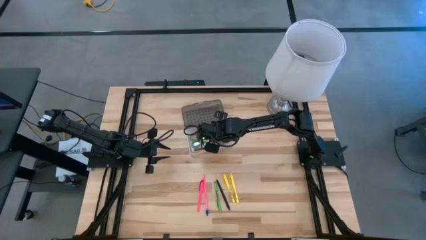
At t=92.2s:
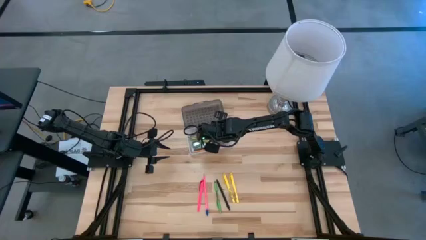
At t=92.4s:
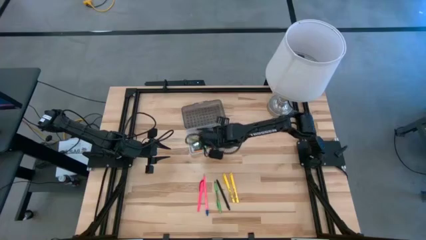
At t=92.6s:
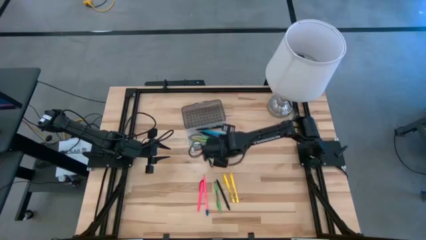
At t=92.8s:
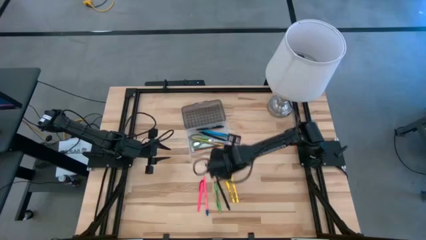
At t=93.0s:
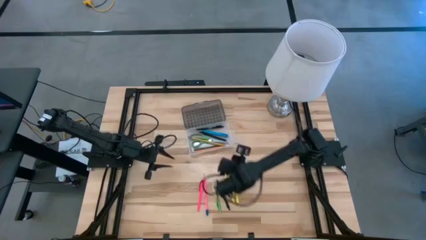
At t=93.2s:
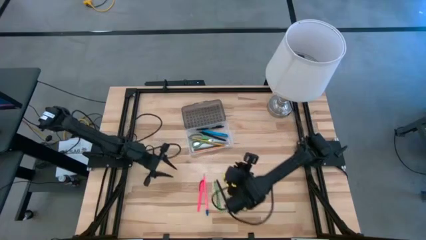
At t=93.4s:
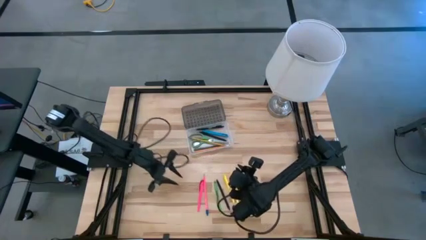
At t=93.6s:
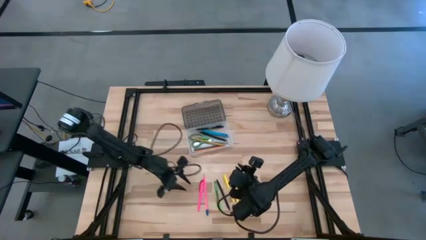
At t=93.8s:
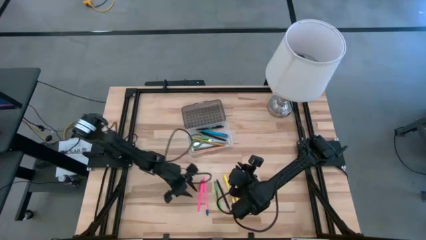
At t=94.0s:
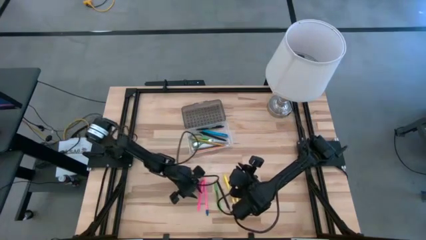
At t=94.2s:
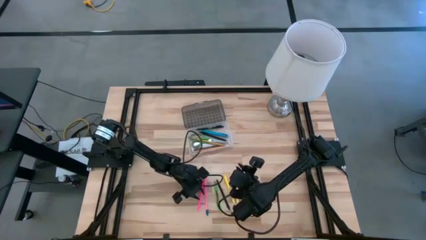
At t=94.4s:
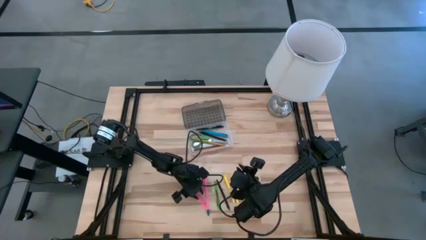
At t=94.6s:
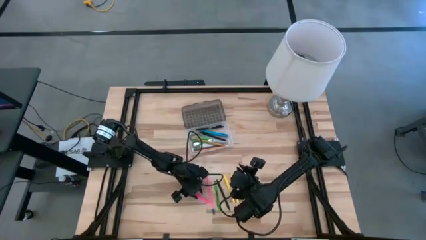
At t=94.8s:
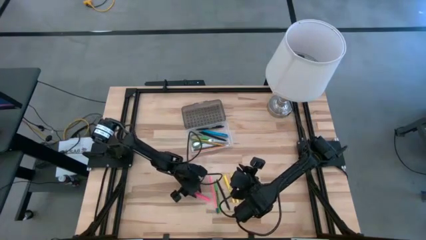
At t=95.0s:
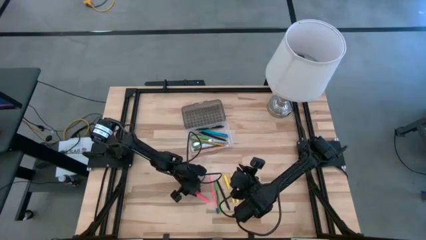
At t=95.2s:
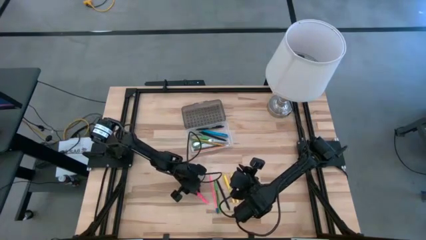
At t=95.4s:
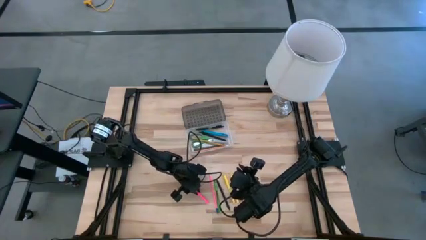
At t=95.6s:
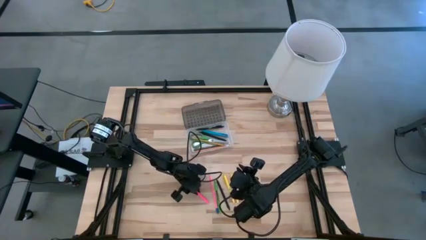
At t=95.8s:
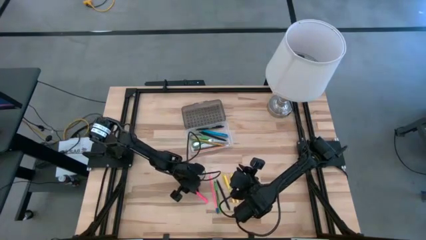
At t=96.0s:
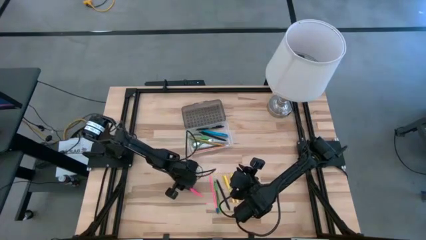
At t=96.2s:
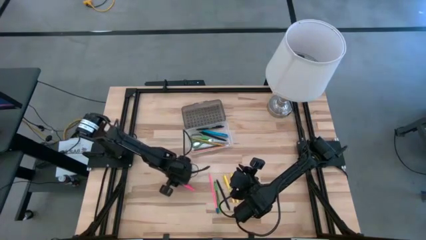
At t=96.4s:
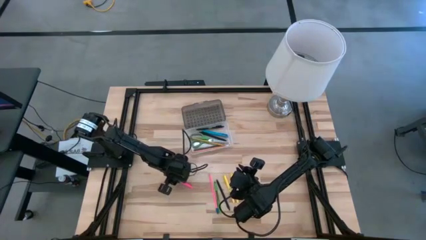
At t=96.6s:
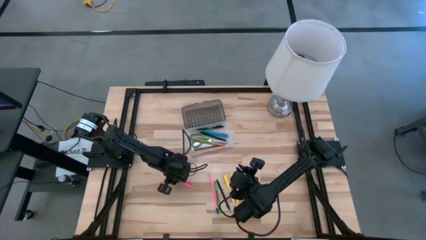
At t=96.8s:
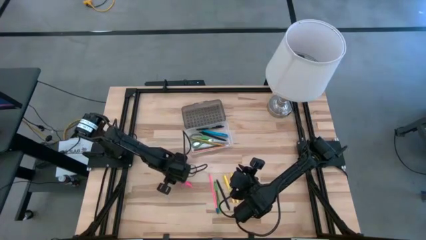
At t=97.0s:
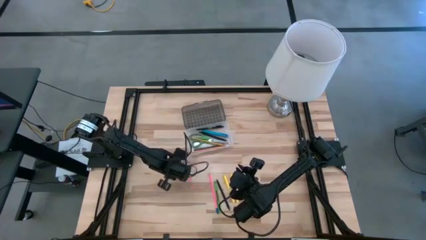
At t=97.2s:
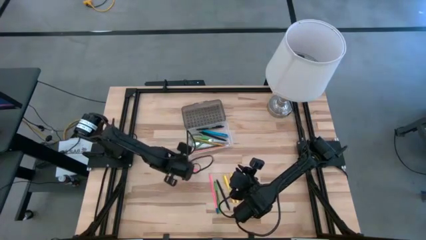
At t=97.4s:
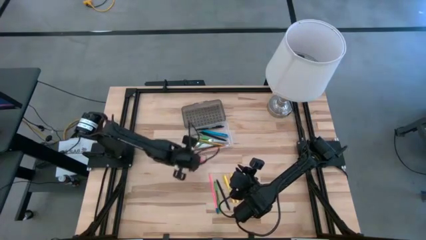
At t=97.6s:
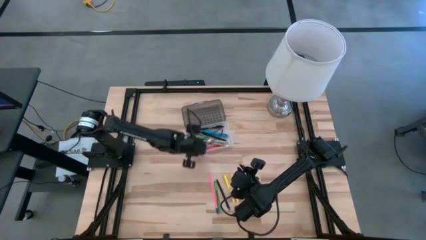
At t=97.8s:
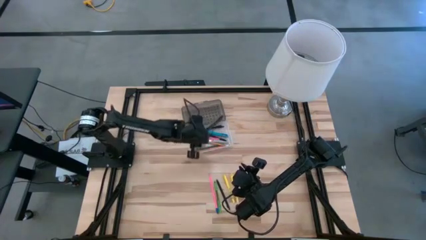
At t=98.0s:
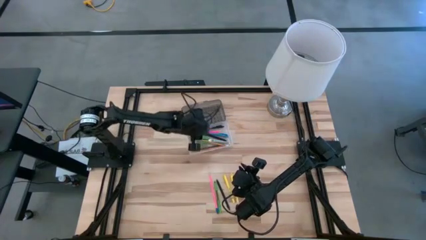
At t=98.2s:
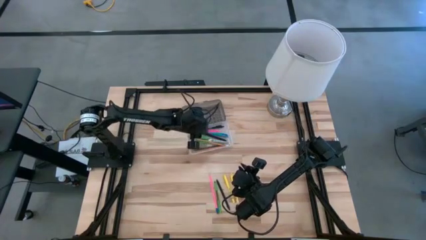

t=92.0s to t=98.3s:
Task: Pick & place school supplies into a supply box
Put the pink marker into the transparent supply box

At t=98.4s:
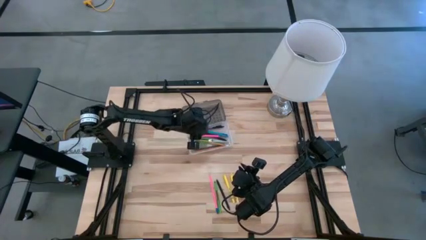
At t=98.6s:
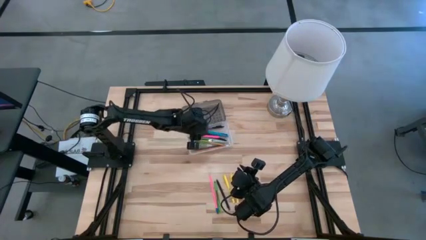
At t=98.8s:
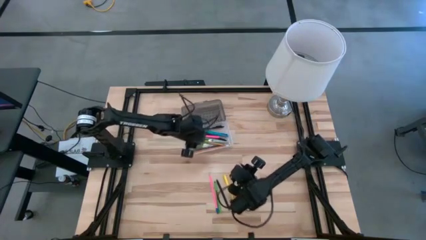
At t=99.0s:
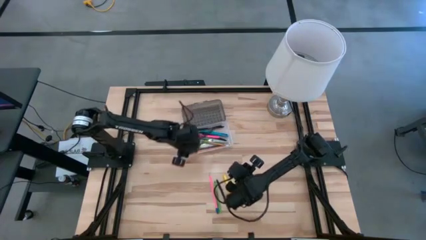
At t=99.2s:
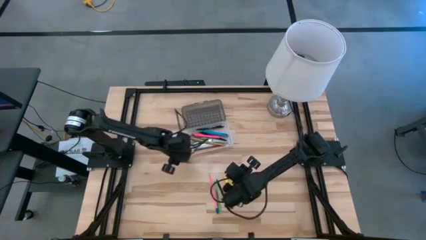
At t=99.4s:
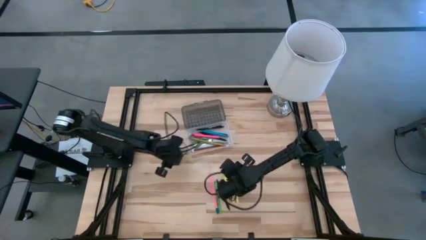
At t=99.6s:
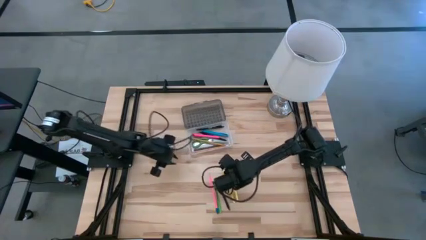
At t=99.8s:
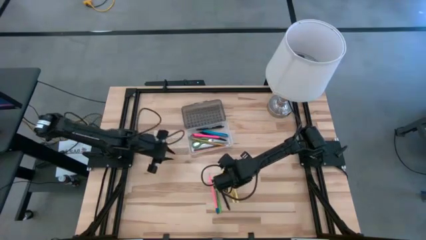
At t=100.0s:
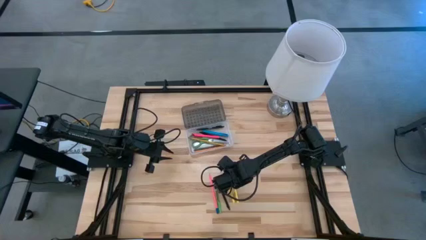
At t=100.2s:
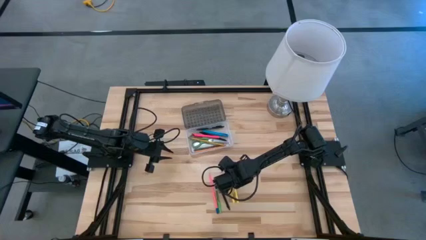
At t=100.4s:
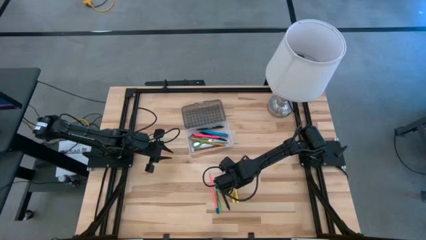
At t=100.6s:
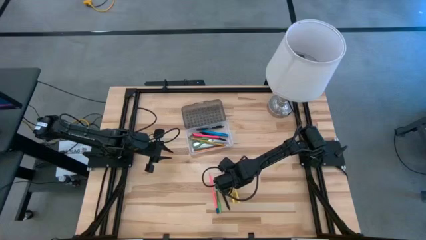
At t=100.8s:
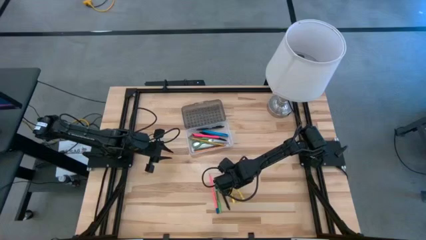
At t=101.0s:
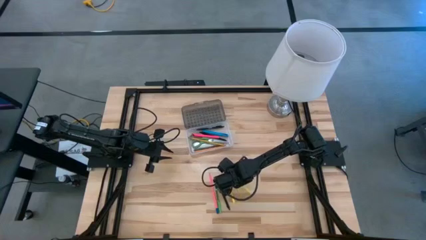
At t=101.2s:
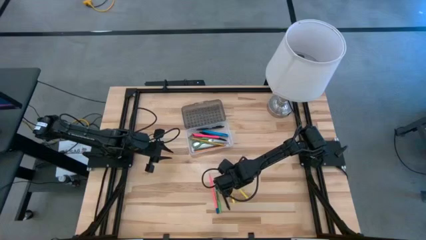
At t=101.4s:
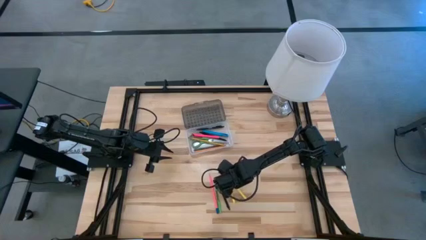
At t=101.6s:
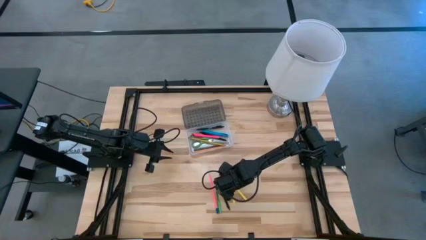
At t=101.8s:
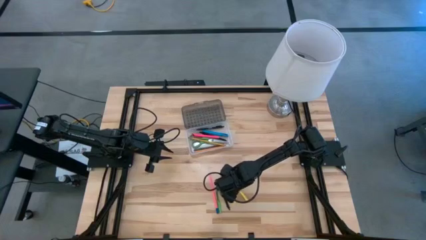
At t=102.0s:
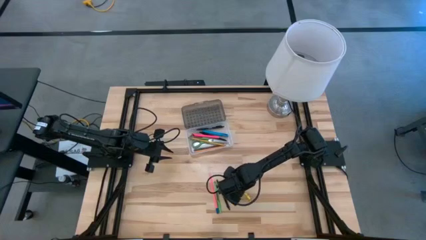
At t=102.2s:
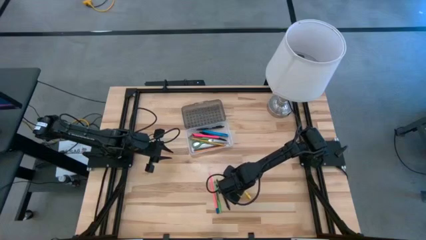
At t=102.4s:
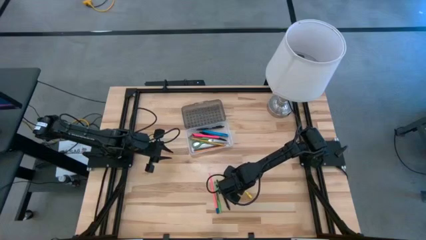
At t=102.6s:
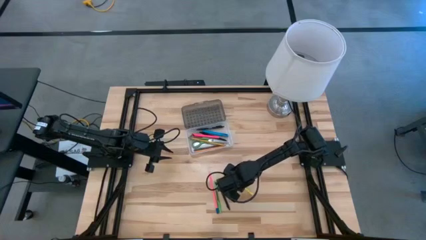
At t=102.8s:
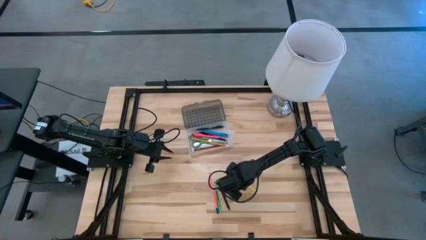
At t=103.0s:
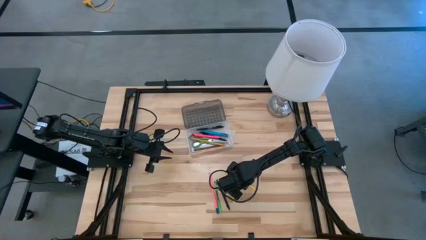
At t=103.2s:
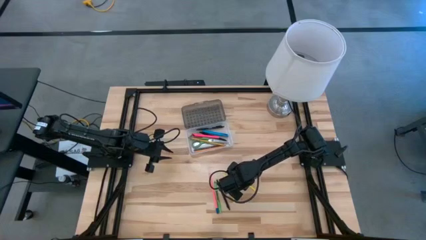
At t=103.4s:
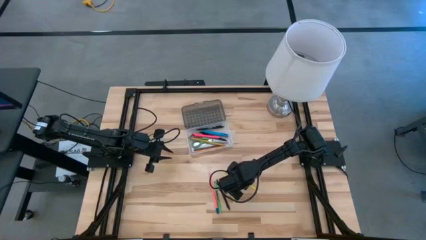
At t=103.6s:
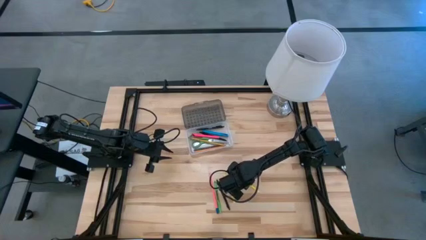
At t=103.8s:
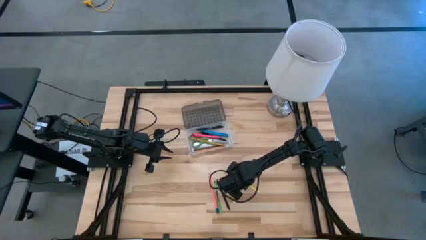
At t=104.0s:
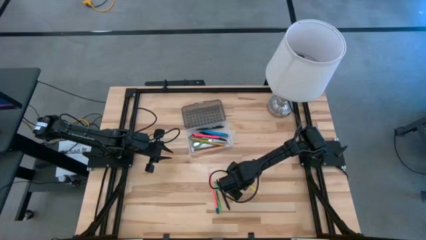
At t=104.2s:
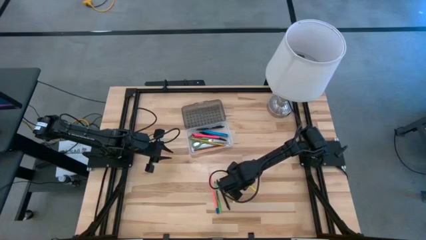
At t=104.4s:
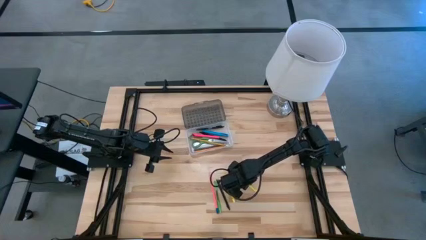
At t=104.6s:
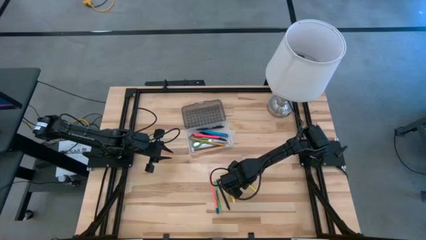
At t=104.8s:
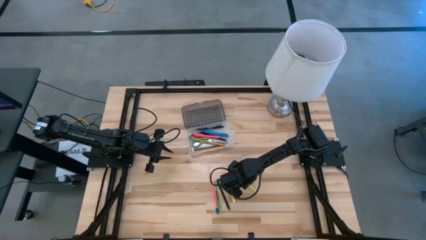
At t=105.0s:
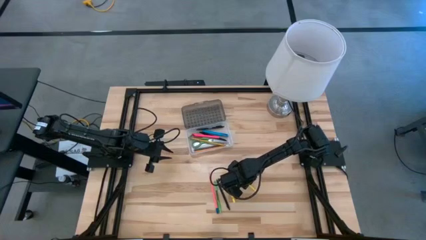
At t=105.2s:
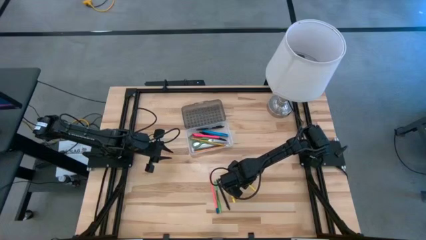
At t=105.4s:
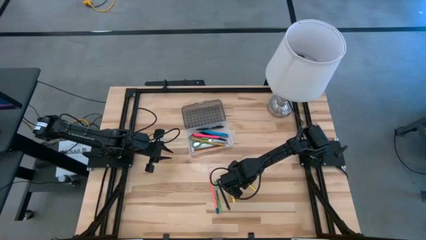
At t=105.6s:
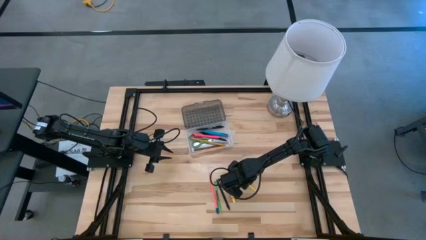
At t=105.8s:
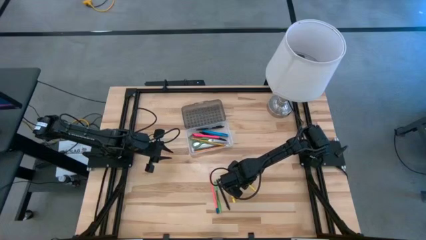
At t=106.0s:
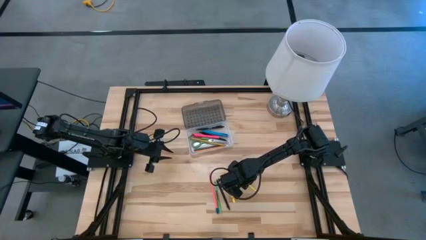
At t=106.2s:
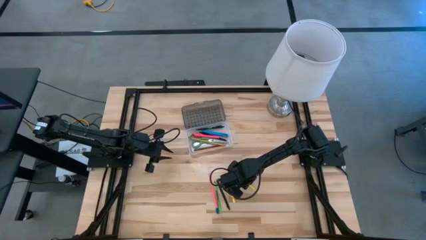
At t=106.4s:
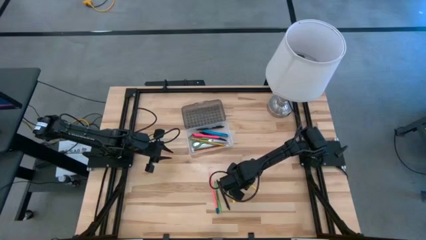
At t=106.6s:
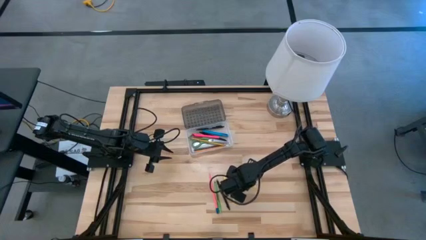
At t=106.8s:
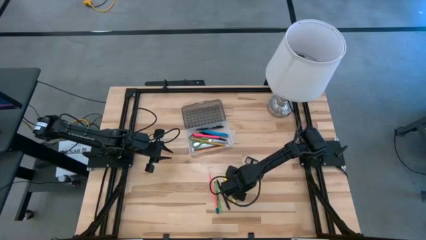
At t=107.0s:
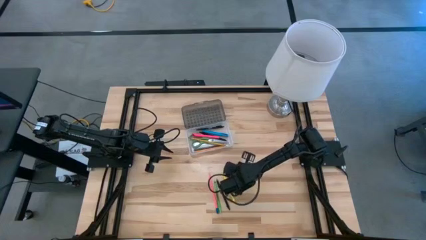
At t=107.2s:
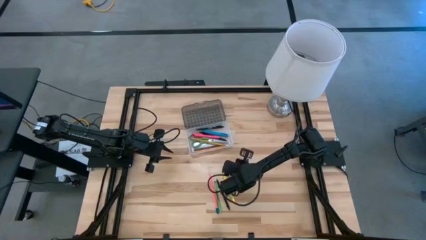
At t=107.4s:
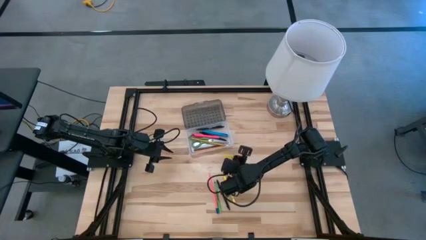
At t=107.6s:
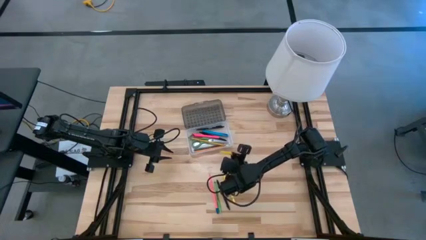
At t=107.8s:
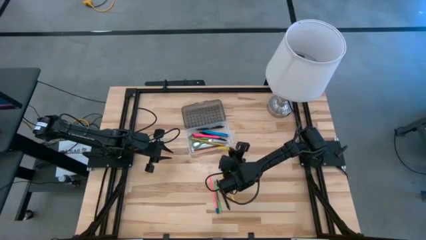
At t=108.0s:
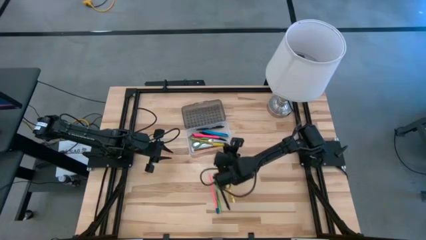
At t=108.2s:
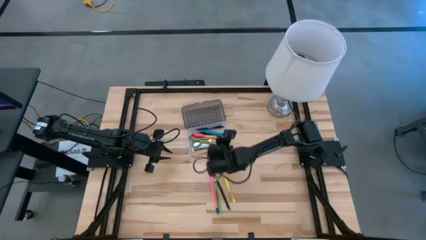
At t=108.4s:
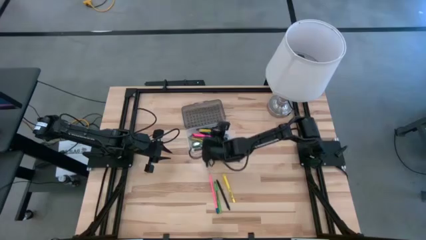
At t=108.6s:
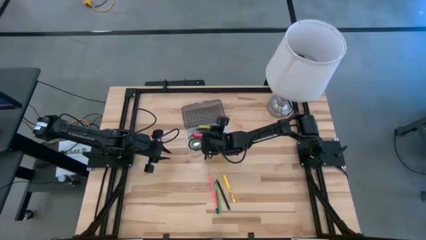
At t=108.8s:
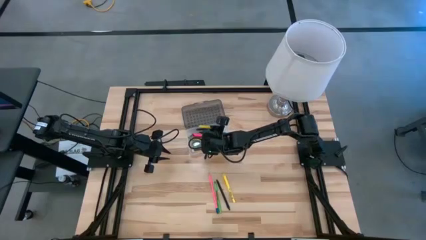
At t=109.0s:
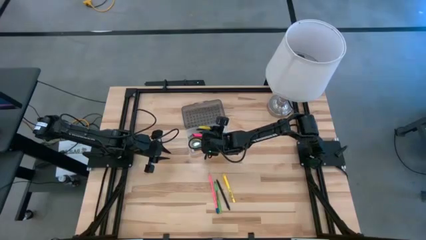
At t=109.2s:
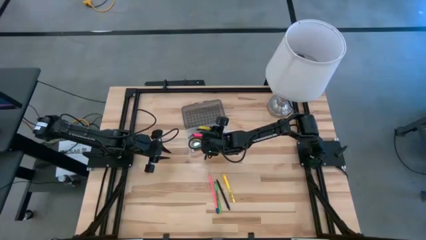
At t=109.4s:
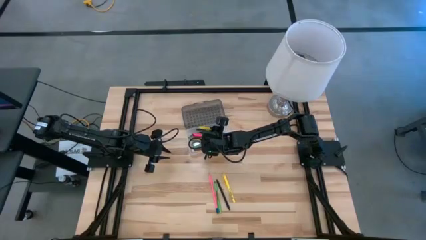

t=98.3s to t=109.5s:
Put the right yellow marker into the transparent supply box
